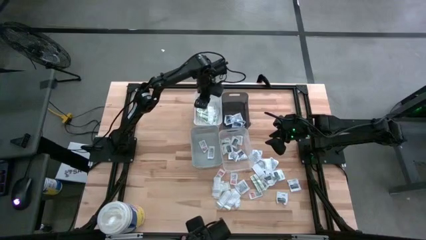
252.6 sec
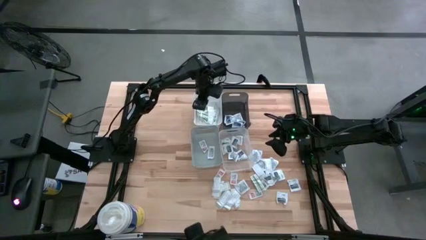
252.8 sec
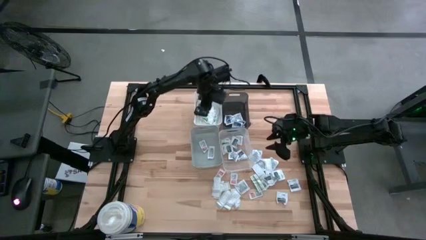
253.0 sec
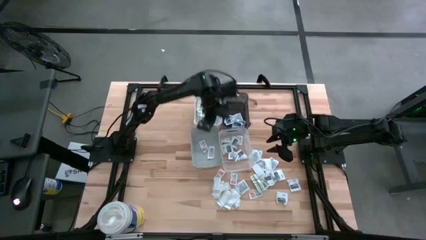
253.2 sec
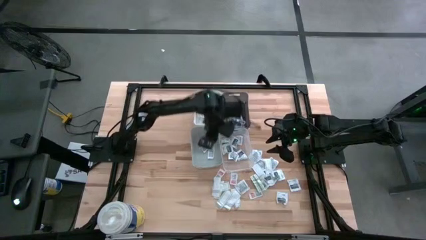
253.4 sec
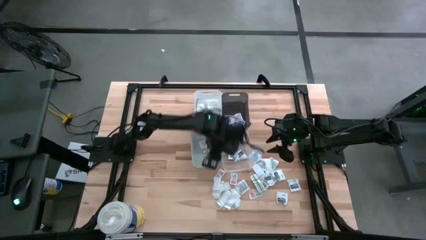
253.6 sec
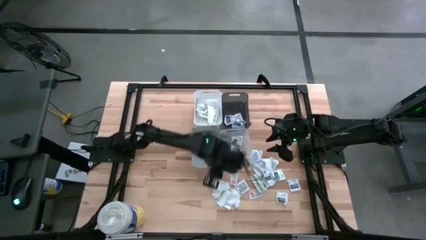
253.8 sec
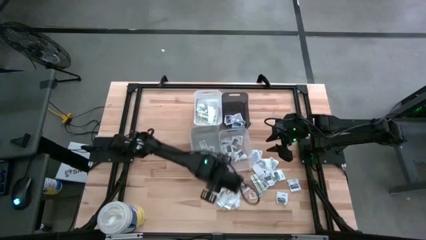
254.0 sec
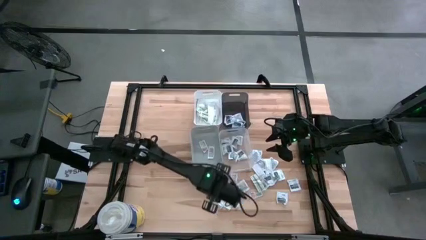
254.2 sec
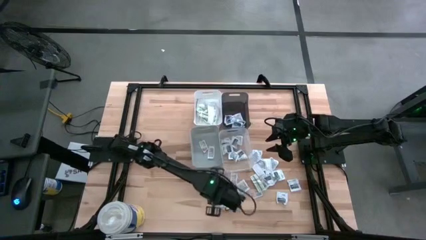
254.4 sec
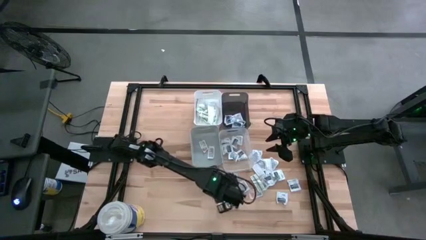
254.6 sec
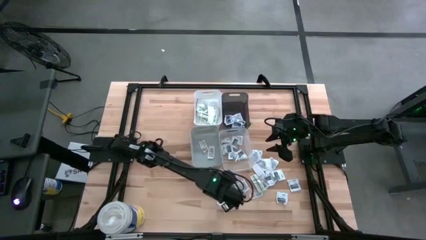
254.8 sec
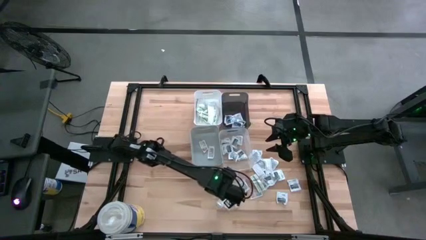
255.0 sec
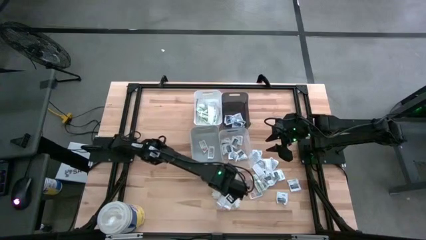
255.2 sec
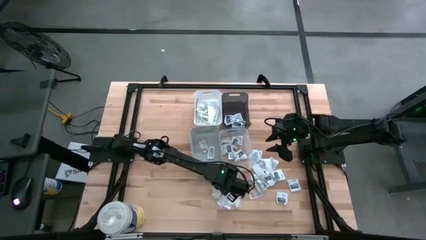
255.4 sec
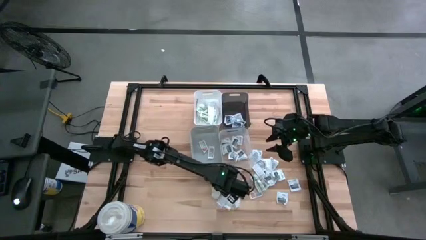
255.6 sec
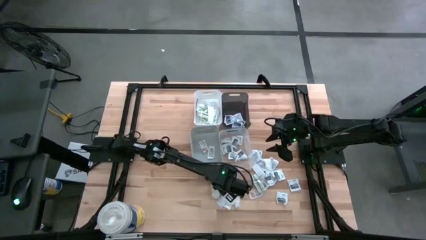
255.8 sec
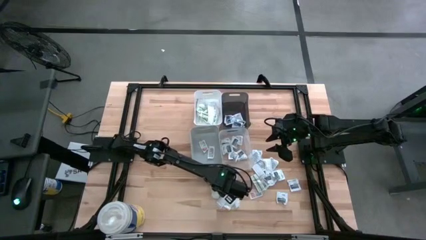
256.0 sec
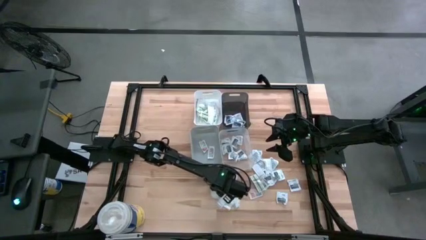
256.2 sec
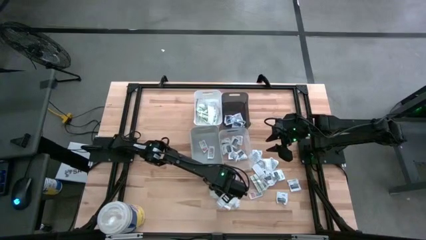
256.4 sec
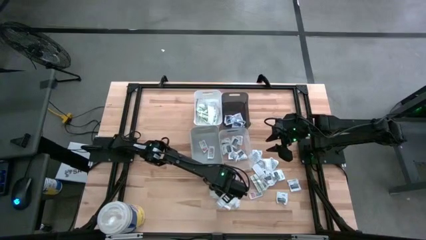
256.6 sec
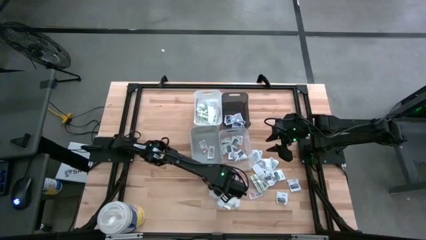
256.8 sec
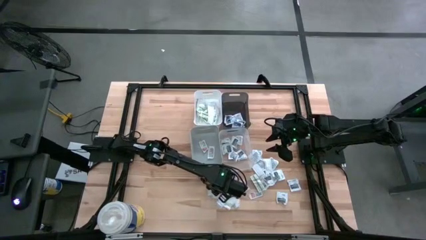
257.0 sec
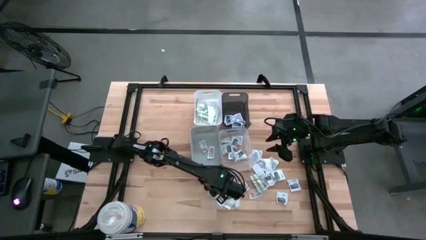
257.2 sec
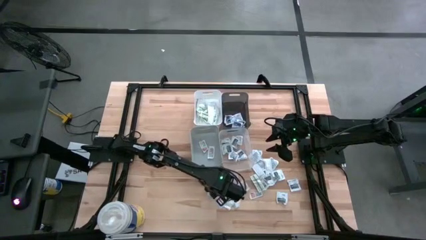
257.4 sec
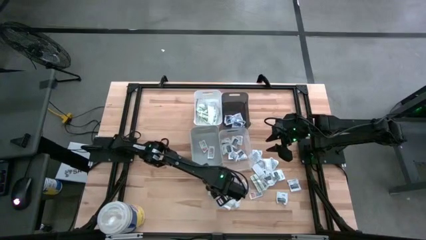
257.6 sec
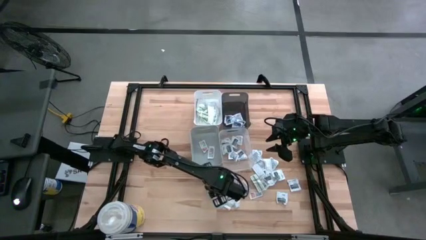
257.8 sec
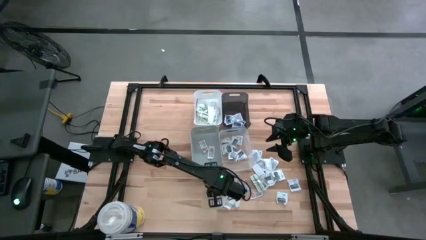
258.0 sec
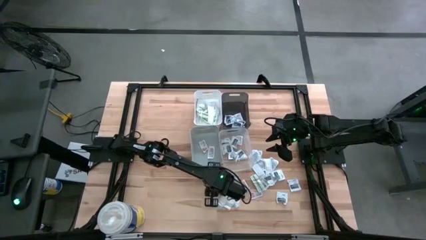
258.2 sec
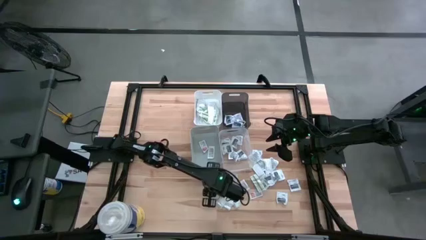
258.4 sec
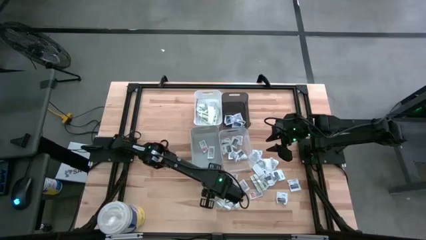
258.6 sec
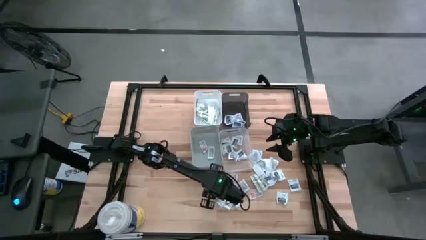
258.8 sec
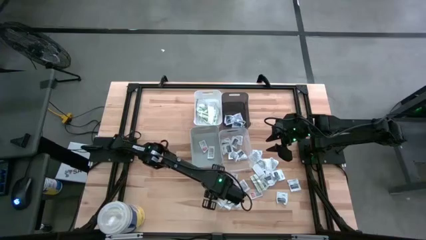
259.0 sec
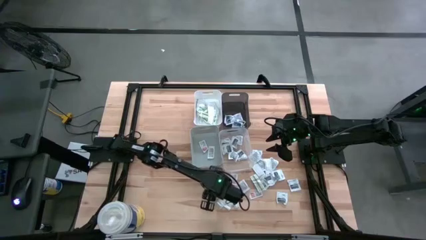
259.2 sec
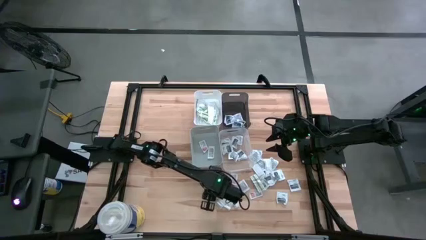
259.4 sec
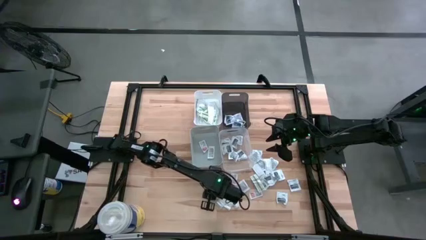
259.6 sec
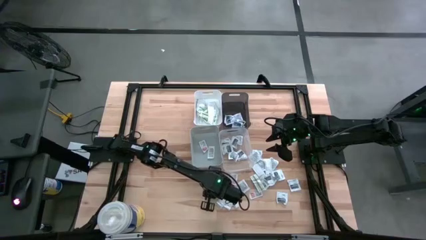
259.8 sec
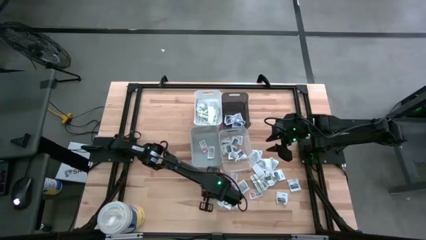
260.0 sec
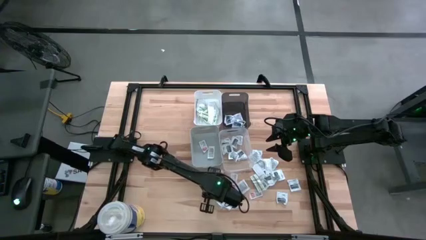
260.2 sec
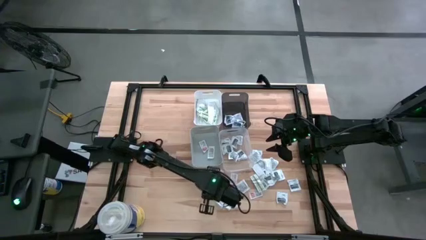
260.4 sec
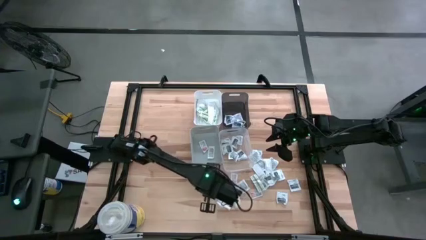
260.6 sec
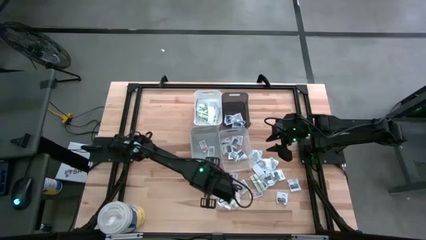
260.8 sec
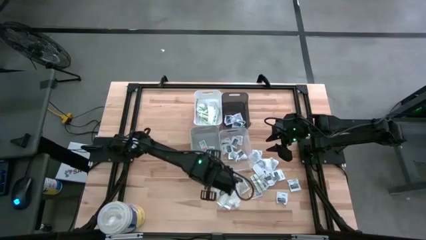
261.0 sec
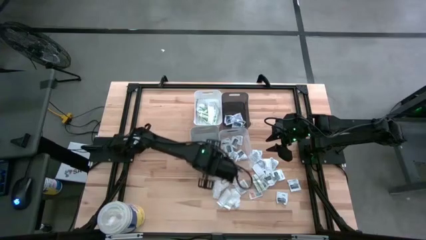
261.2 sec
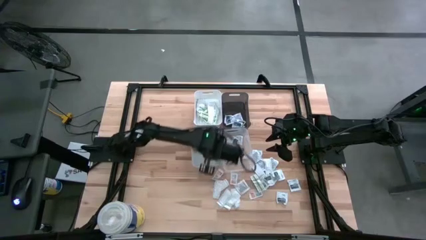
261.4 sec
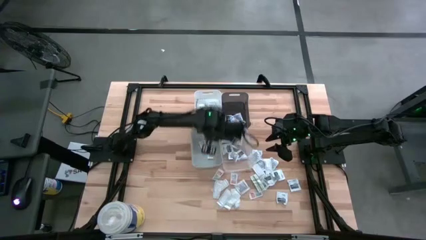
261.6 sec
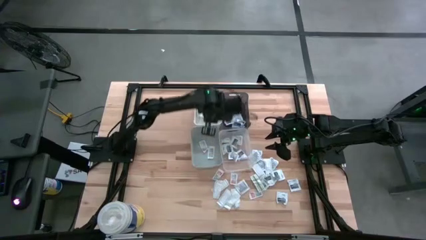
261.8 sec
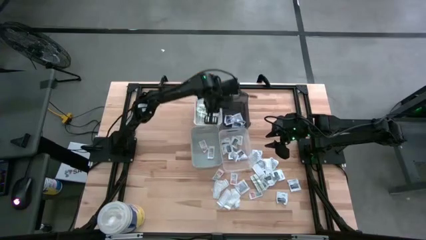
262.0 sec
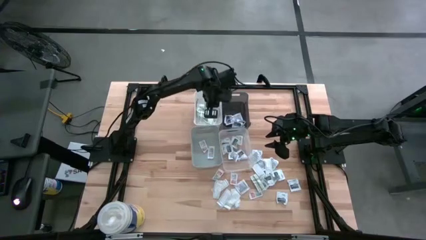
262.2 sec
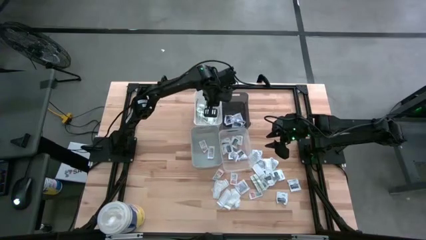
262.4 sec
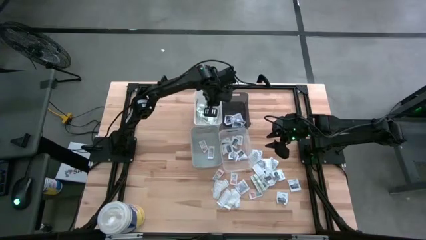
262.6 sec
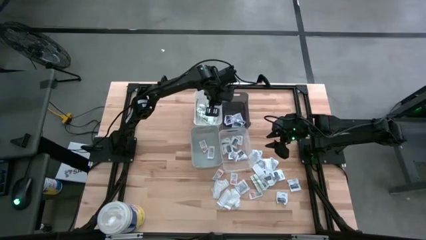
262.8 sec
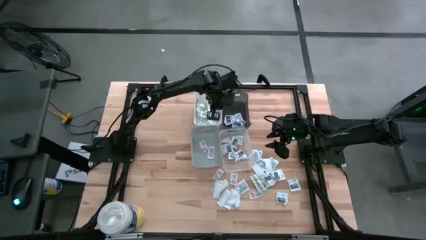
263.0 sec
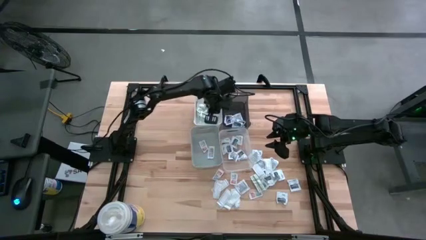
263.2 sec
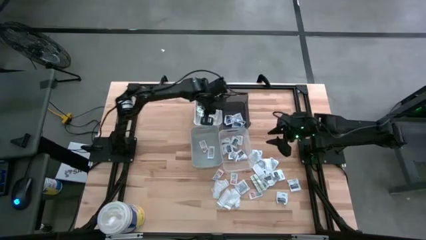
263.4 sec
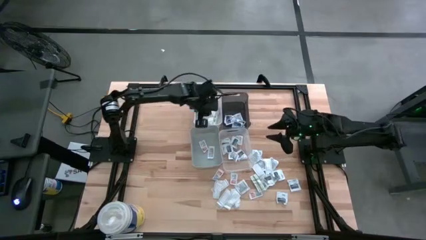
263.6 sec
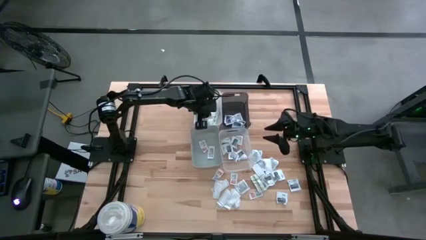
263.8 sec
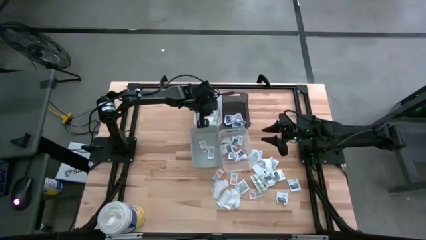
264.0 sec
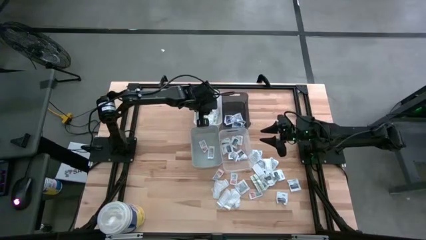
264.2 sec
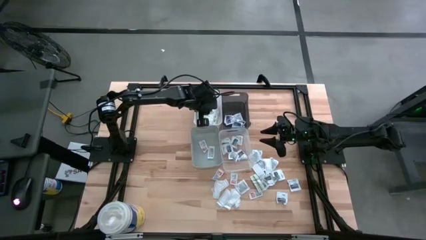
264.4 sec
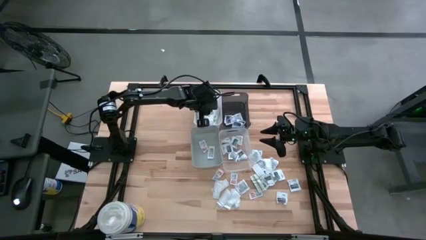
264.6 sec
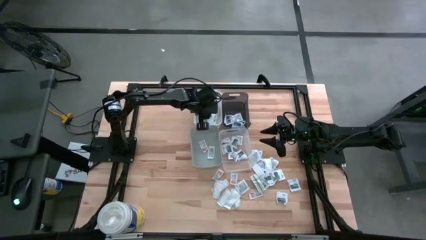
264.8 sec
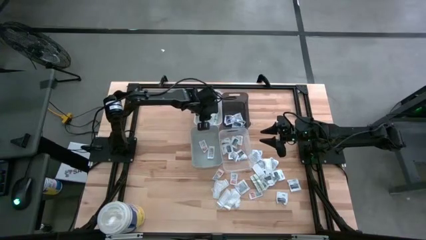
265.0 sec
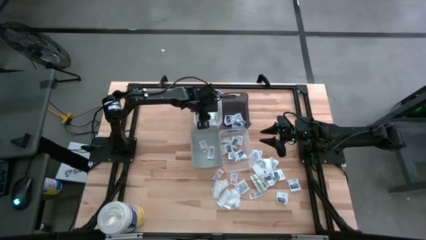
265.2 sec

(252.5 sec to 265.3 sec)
Task: Pick & Place First Aid Supplies
Put the green bandage pack into the white bin
